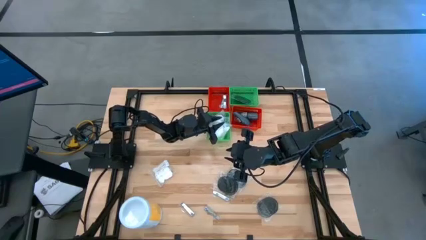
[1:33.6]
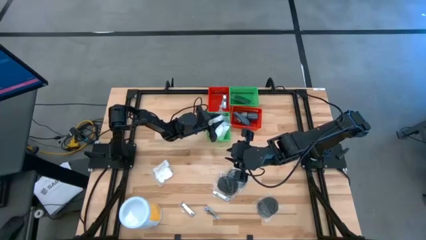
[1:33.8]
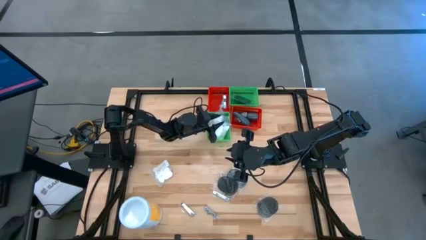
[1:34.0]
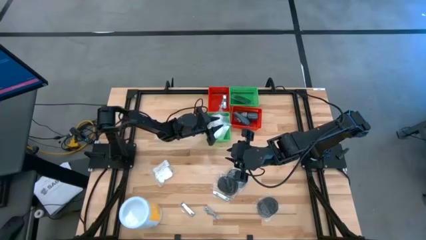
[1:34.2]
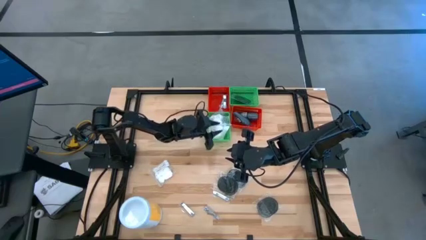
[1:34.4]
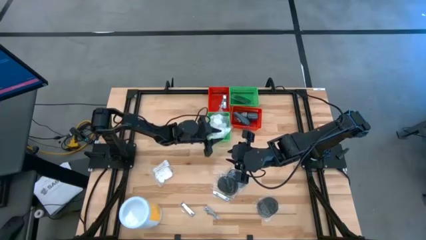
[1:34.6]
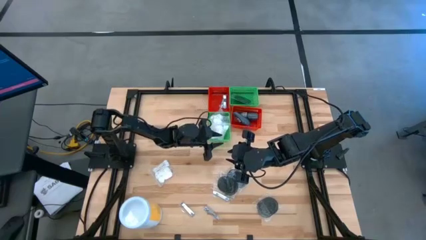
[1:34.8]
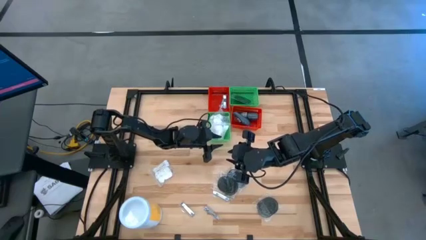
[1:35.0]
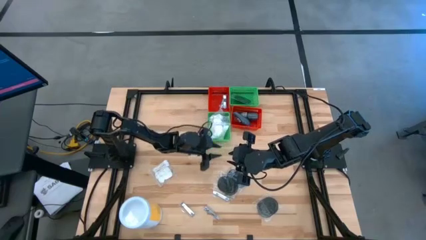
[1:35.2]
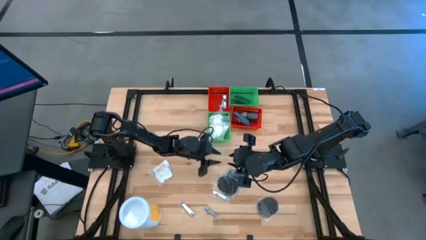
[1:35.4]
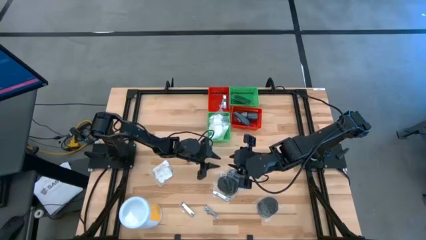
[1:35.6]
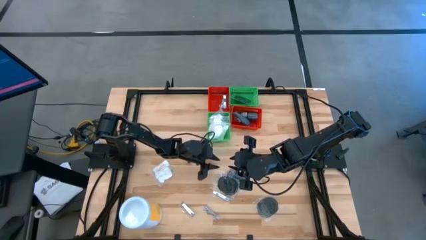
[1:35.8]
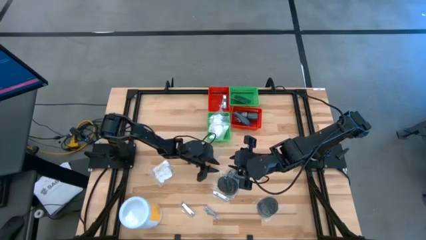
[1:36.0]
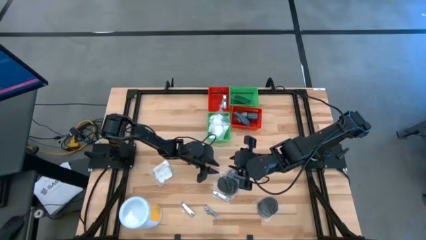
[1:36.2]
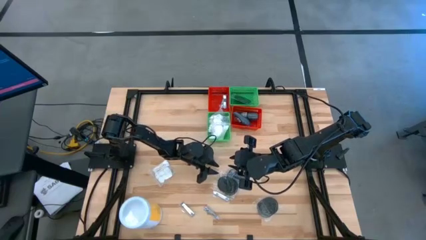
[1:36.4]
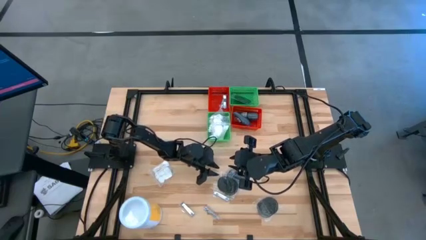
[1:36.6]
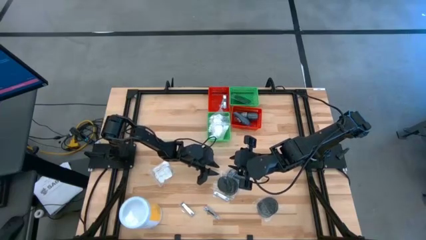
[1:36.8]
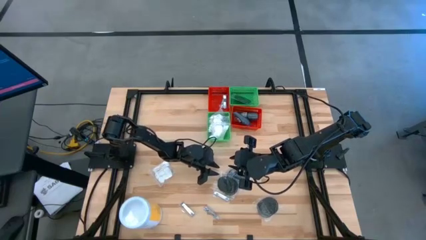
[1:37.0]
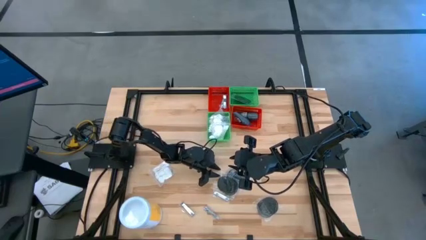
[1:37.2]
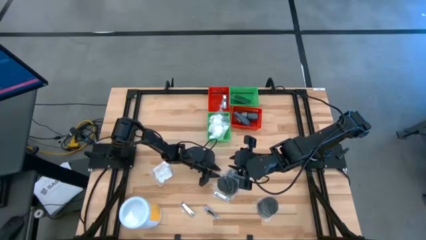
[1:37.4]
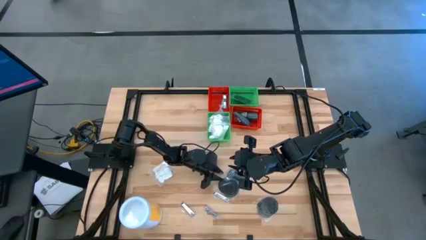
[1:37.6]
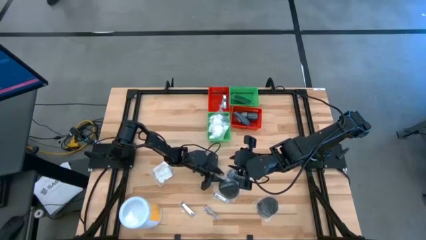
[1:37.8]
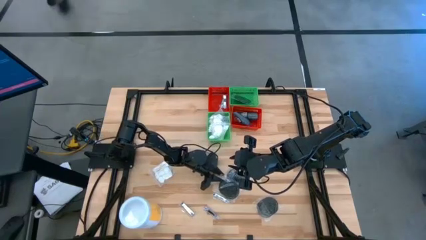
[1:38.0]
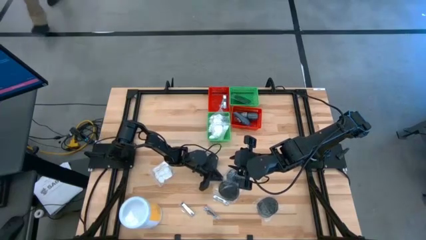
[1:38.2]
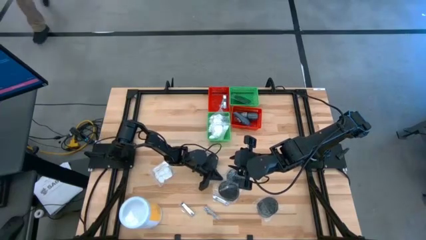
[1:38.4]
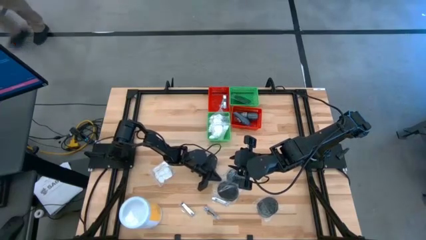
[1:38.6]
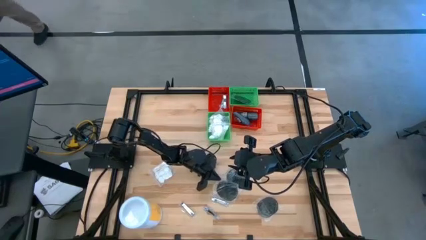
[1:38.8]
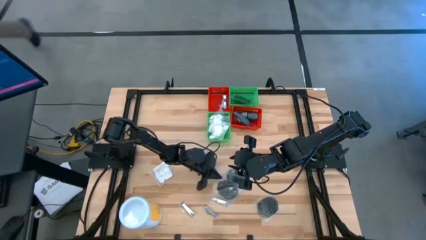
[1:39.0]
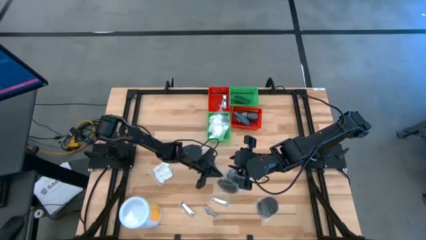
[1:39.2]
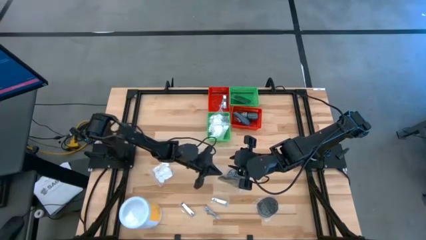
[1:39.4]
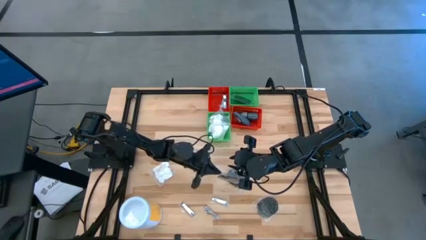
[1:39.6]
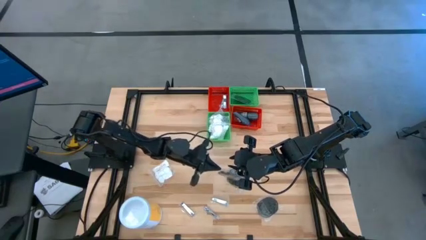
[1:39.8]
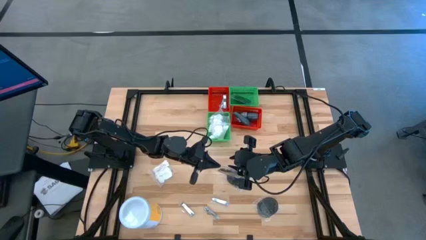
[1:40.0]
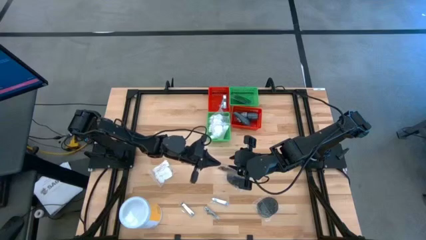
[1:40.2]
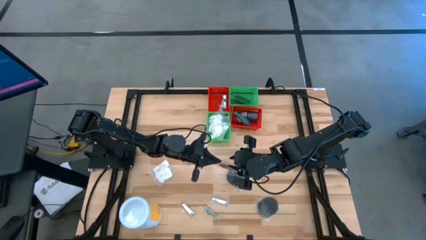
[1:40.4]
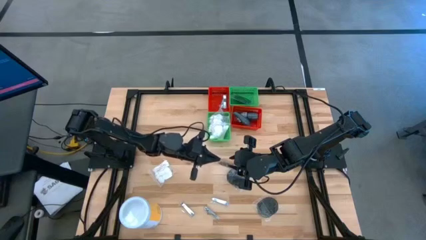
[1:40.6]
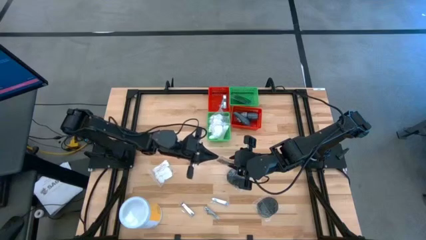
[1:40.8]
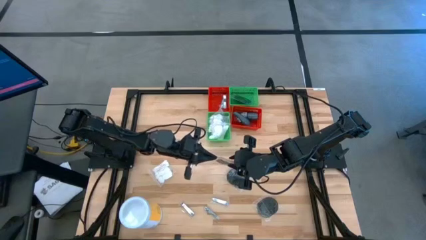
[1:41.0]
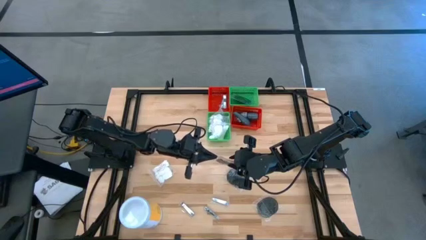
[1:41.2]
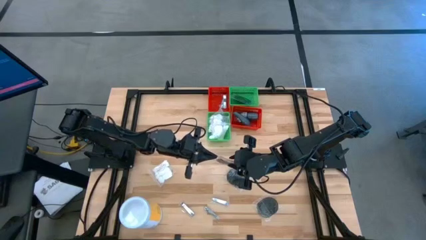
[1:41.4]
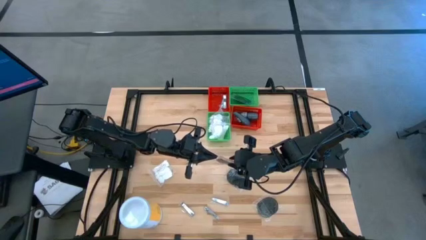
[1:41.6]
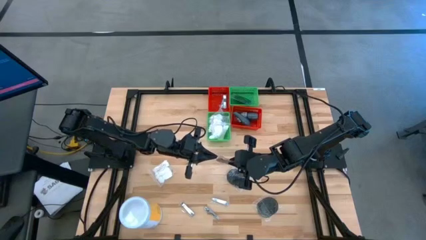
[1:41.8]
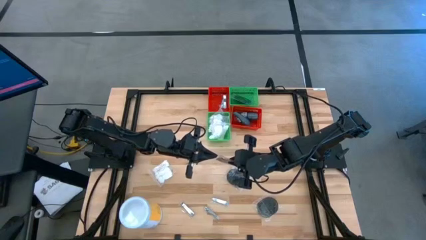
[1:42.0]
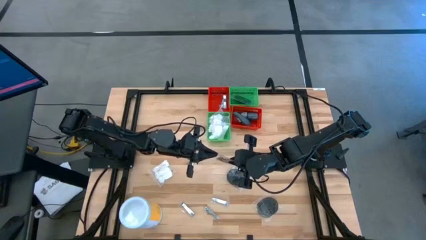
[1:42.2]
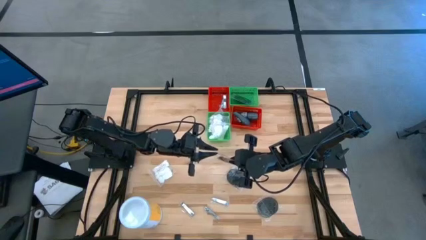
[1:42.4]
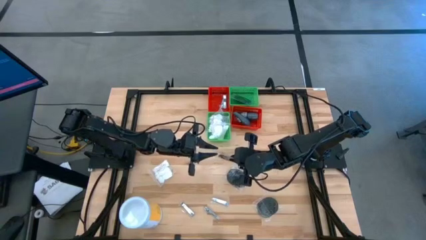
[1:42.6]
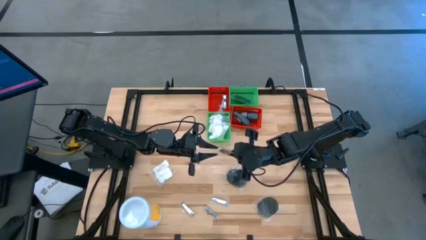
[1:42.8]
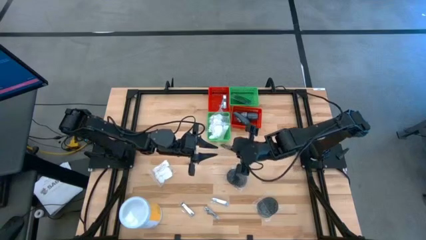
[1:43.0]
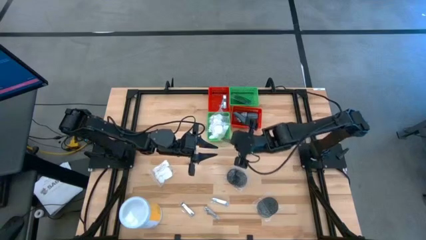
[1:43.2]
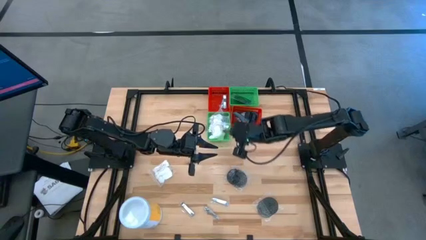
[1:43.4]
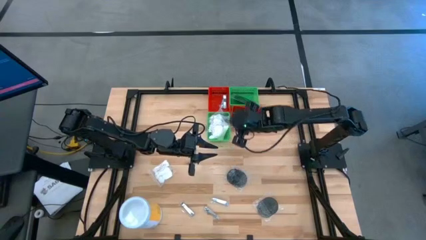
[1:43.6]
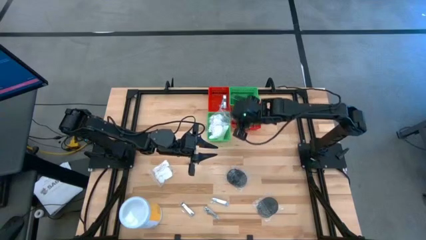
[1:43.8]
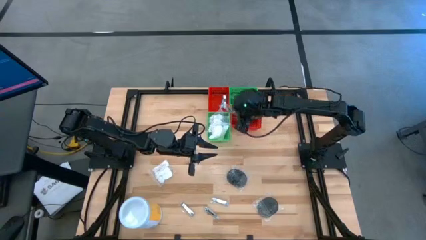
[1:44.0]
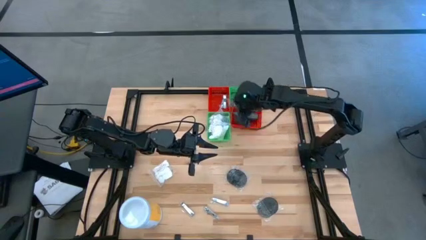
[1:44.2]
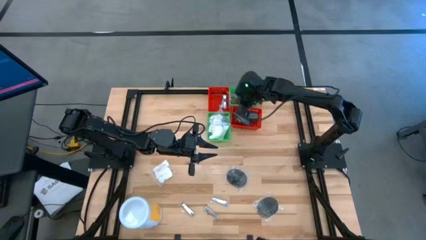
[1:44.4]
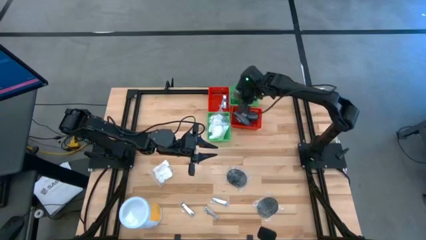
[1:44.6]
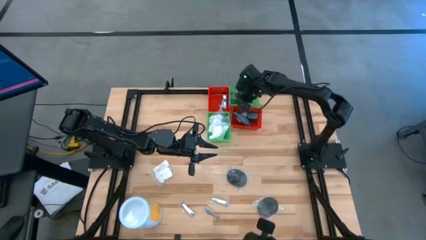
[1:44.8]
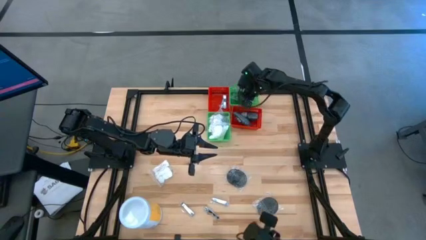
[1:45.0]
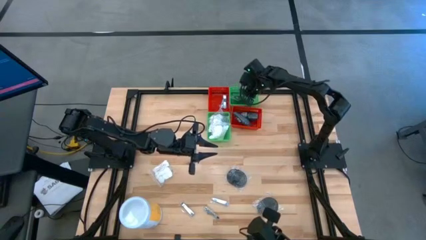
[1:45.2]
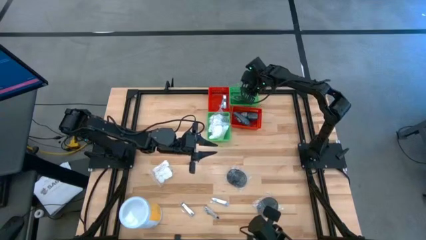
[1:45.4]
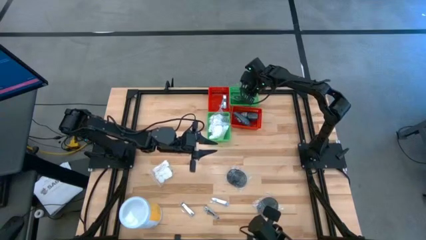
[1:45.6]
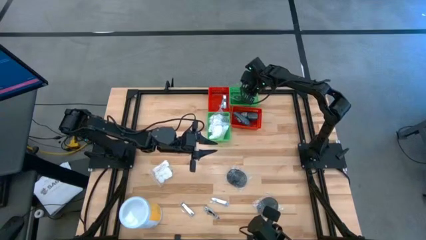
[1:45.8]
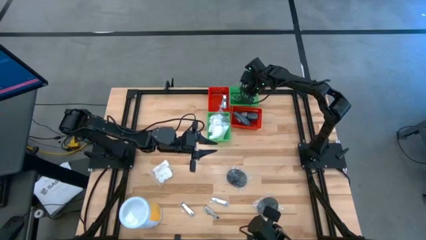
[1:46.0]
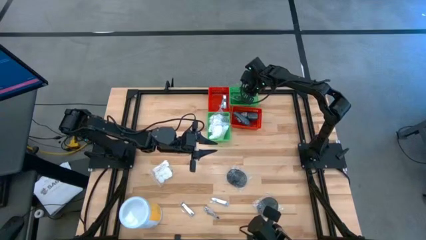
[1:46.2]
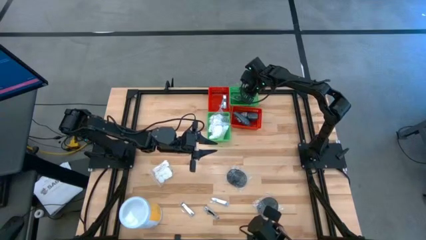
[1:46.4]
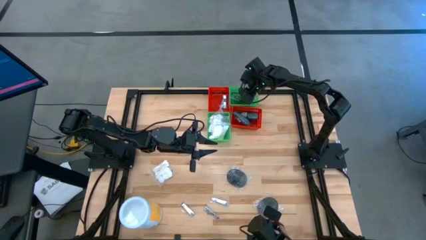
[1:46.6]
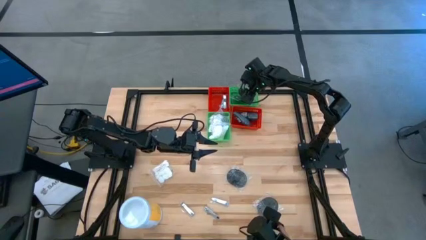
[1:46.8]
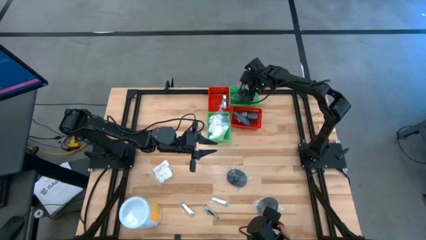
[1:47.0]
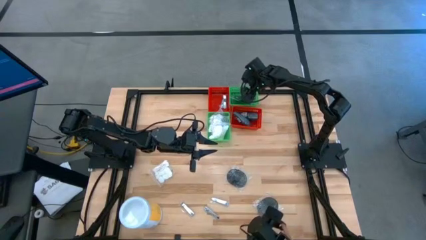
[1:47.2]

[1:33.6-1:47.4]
Task: Pick & Place Travel size toiletries
Put the hairbrush into the right green bin
